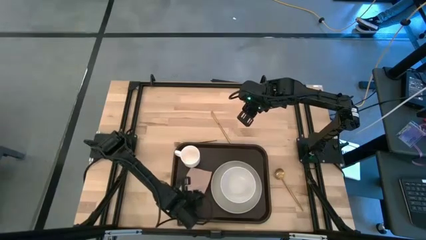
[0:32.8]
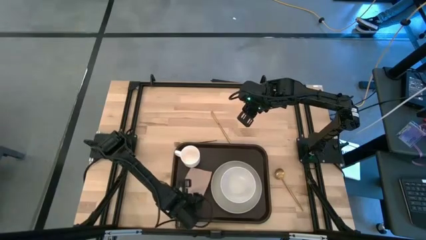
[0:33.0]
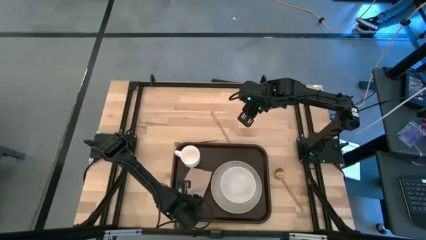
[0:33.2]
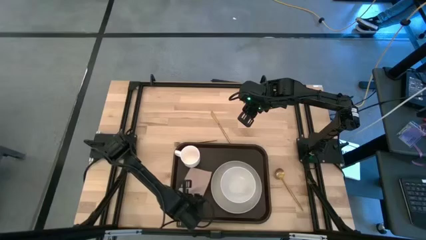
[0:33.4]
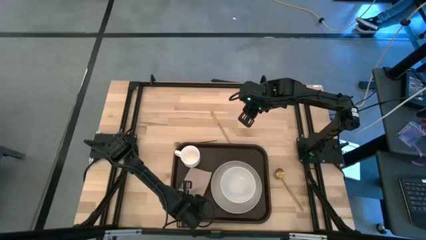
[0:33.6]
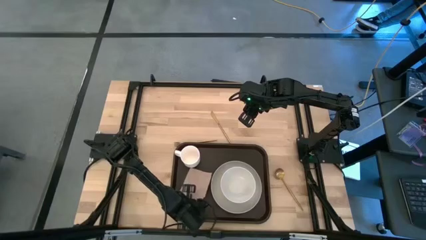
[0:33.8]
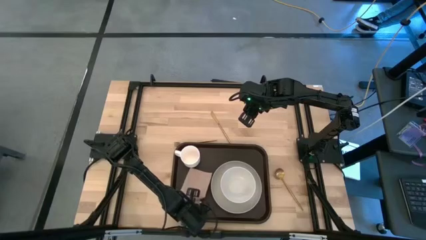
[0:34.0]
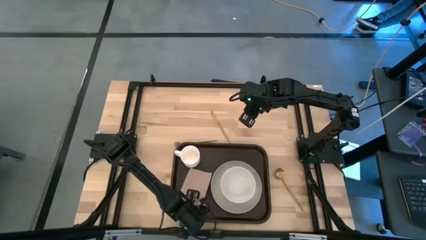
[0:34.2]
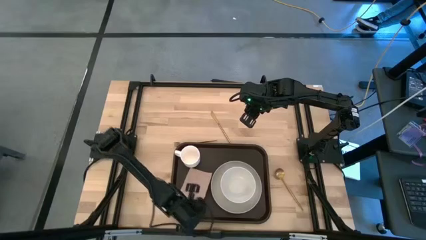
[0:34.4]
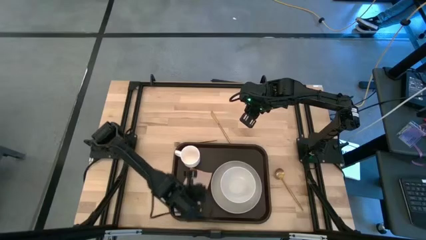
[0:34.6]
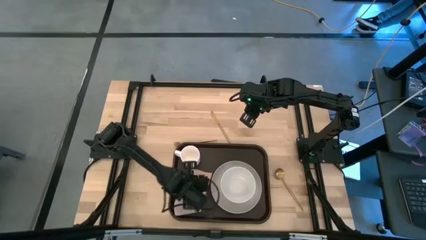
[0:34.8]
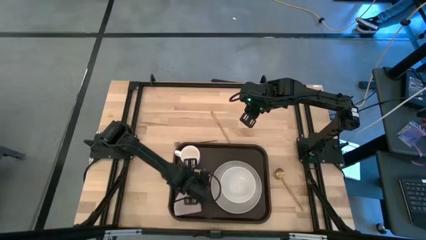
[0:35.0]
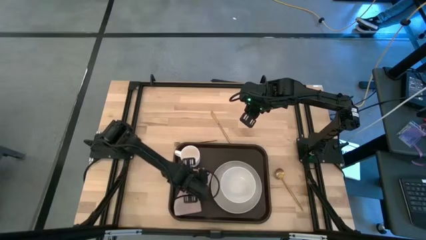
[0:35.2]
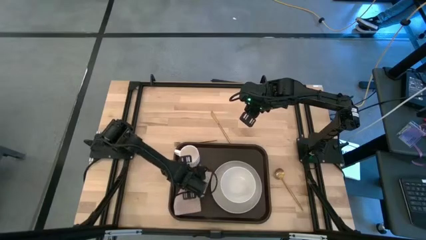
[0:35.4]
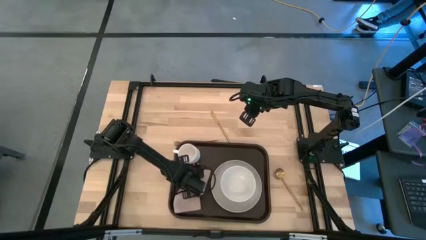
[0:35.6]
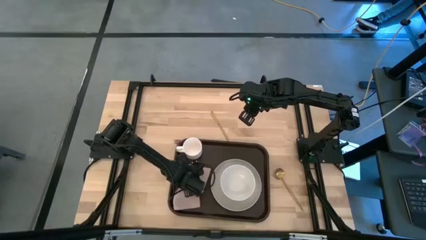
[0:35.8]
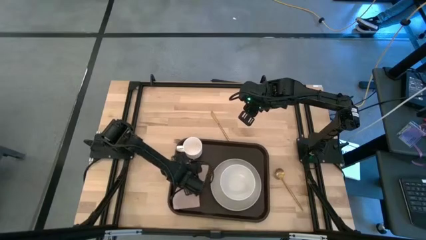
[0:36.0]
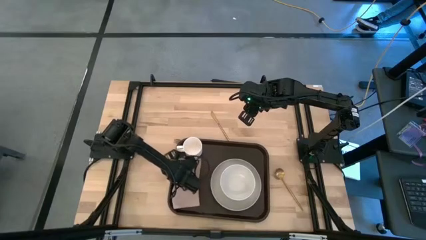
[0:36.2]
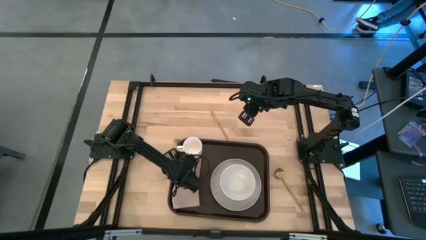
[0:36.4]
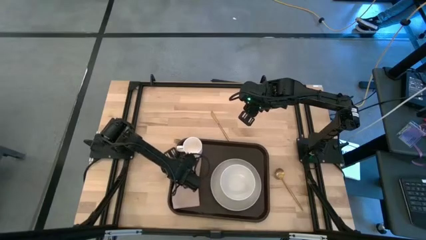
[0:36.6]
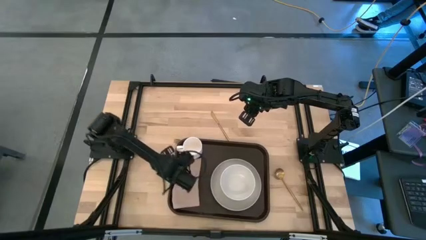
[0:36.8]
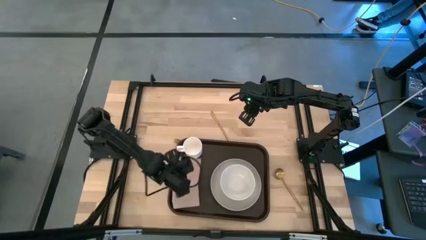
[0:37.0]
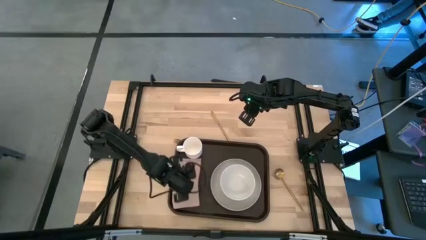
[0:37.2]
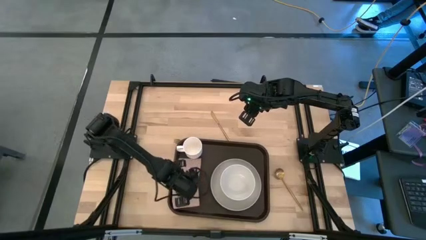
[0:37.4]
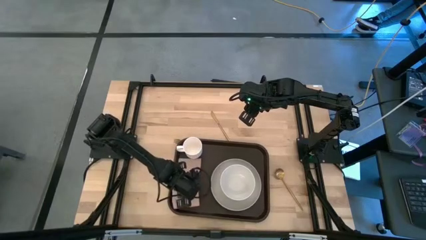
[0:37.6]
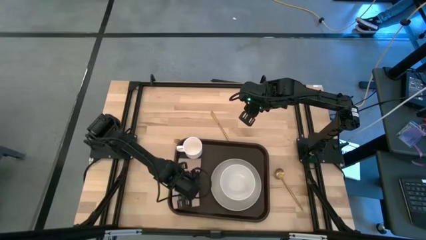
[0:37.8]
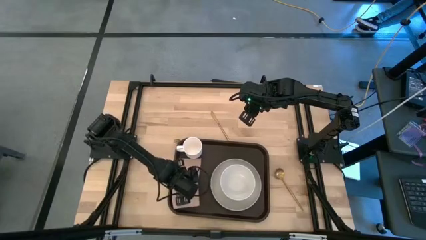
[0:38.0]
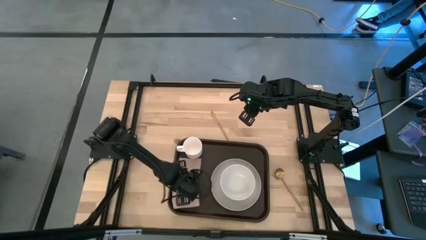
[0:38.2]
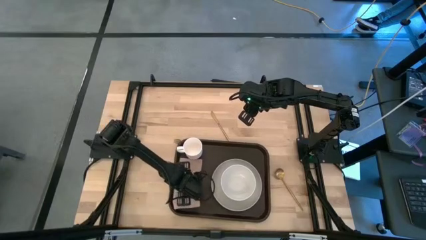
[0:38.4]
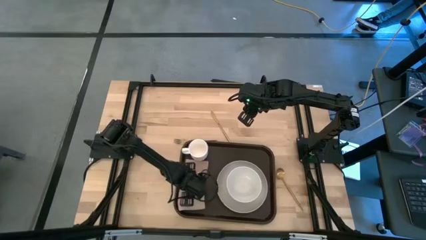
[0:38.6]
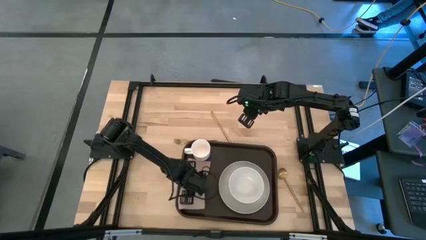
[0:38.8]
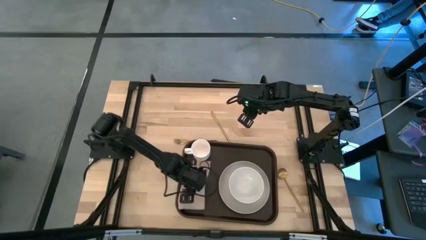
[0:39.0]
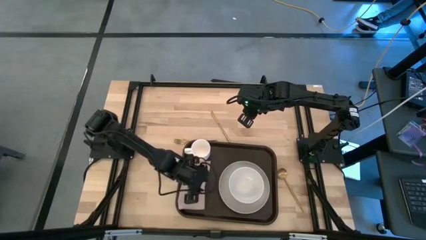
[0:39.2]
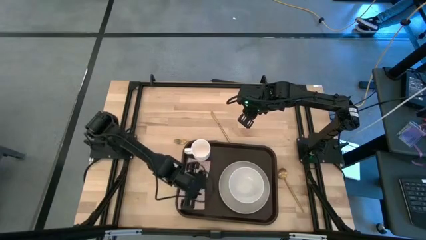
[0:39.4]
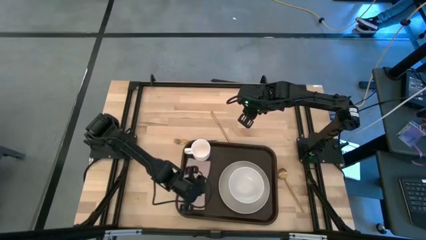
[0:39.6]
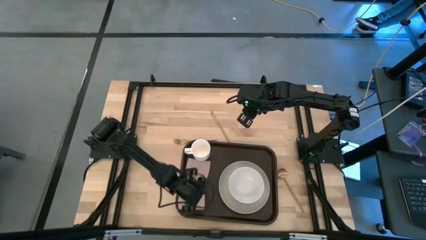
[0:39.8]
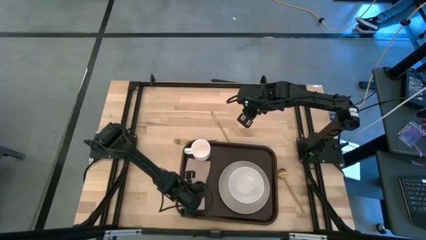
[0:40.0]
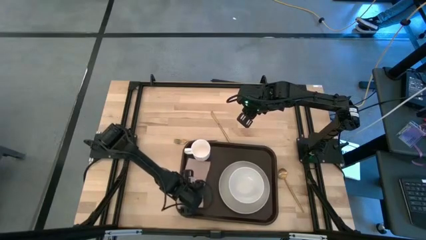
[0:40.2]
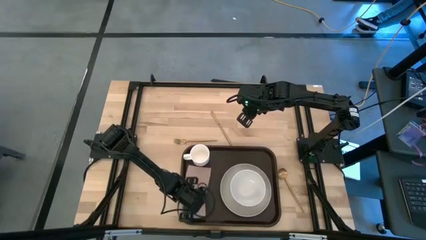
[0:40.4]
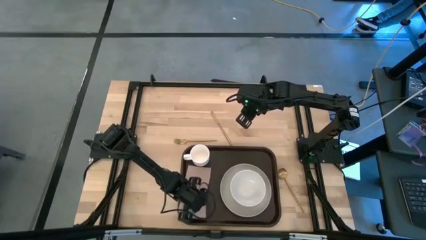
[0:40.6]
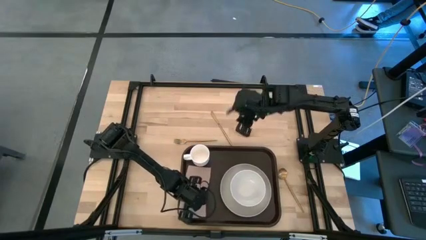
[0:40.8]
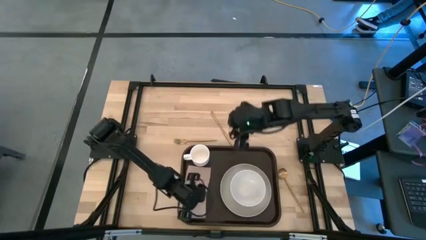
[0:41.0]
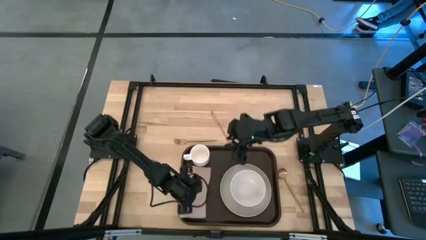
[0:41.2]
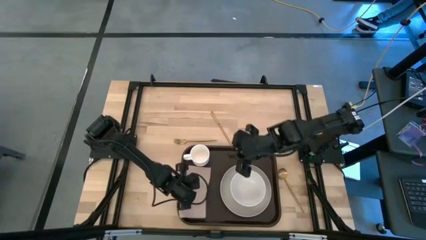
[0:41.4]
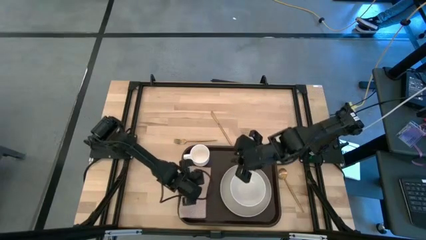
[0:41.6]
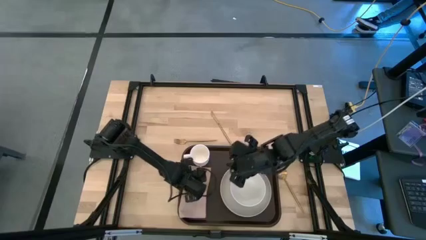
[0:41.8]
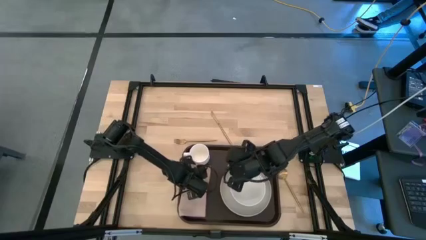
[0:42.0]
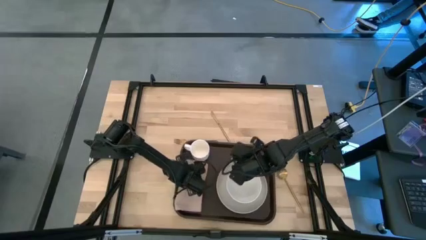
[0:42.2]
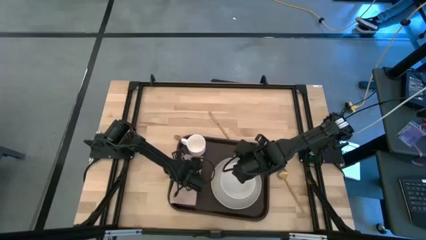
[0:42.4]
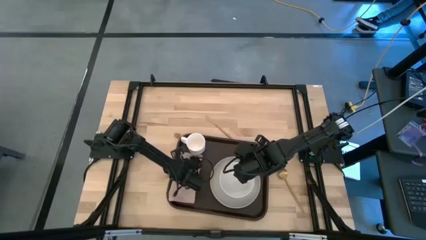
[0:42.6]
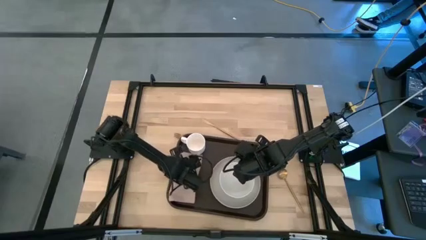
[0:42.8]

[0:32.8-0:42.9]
Task: Set up tray
Put the brown napkin on the black serving tray to the bottom of the white mug

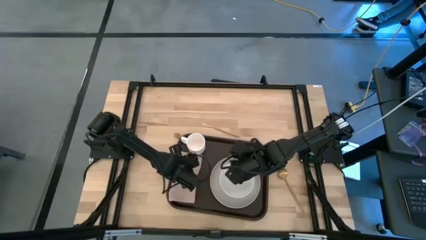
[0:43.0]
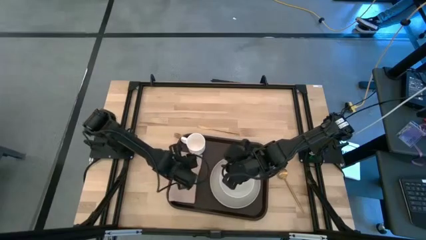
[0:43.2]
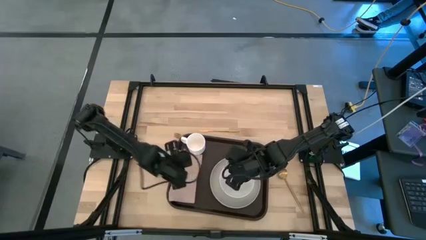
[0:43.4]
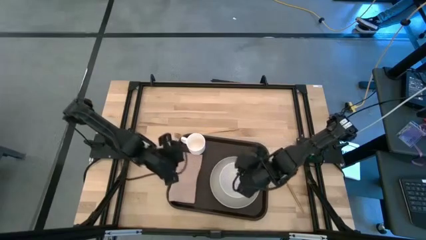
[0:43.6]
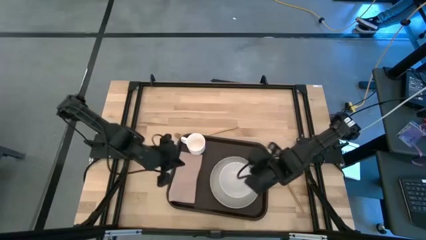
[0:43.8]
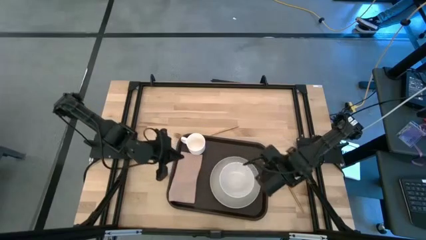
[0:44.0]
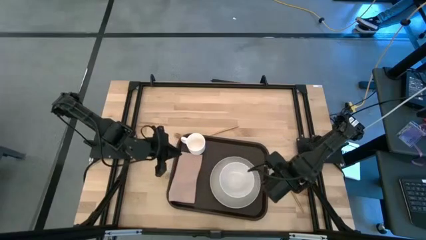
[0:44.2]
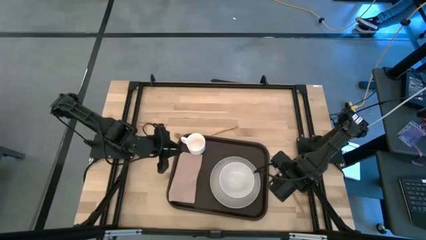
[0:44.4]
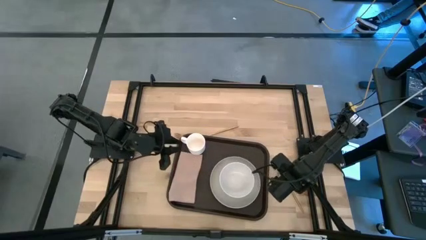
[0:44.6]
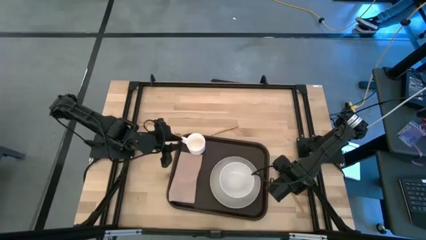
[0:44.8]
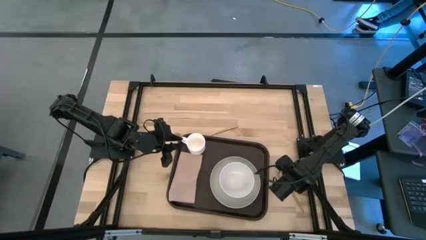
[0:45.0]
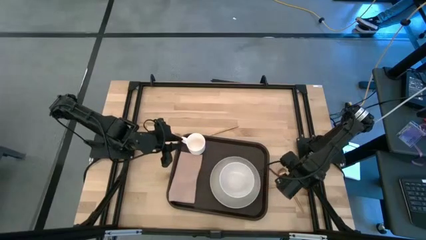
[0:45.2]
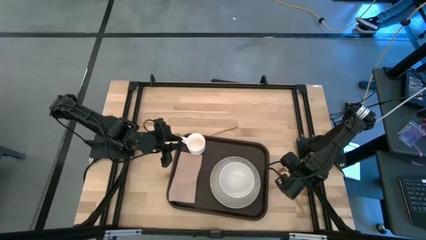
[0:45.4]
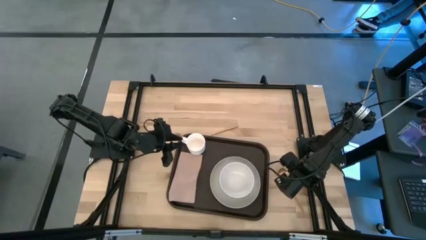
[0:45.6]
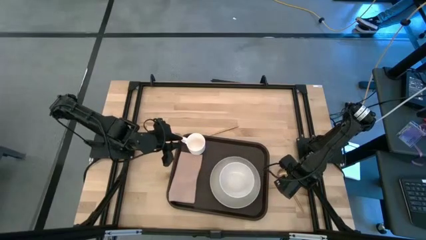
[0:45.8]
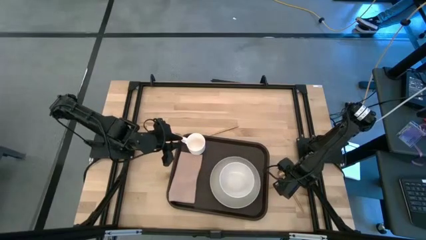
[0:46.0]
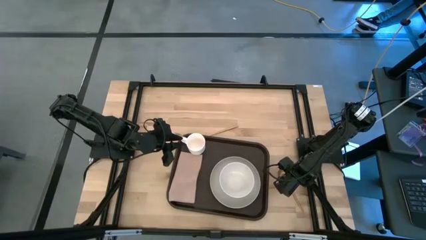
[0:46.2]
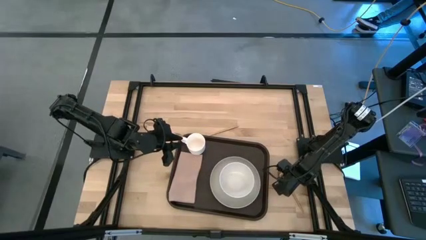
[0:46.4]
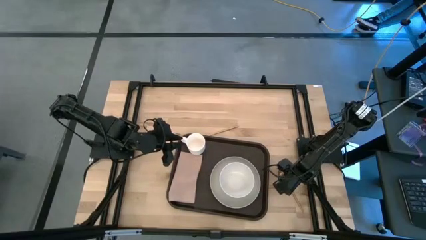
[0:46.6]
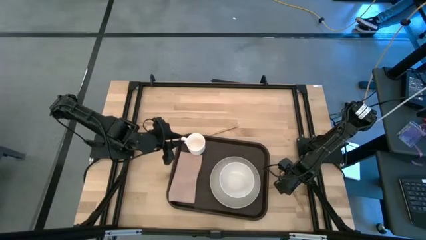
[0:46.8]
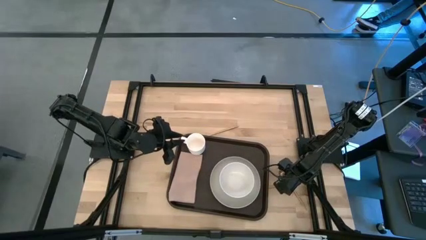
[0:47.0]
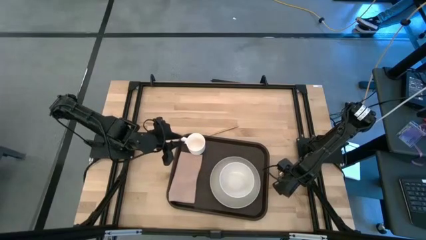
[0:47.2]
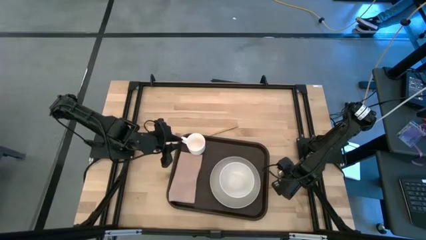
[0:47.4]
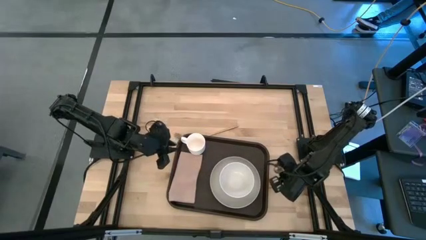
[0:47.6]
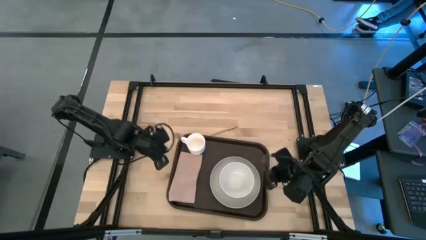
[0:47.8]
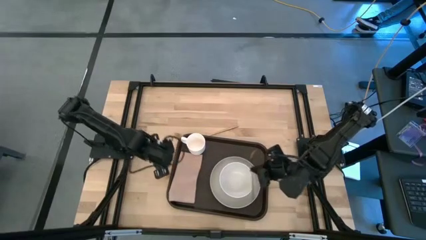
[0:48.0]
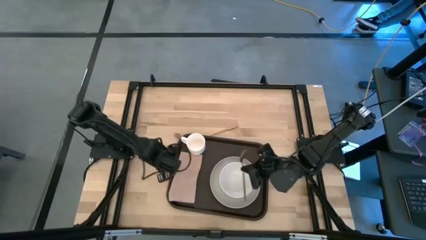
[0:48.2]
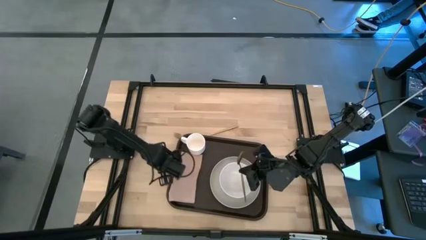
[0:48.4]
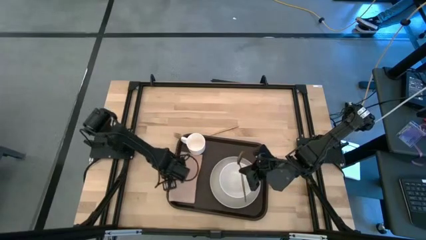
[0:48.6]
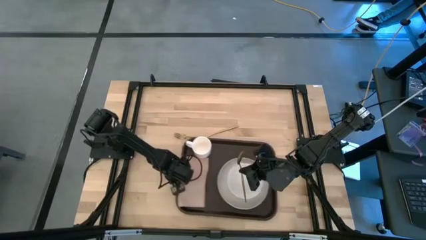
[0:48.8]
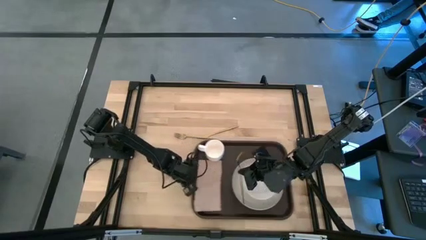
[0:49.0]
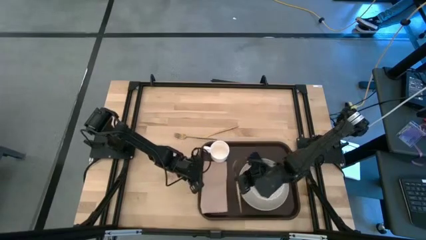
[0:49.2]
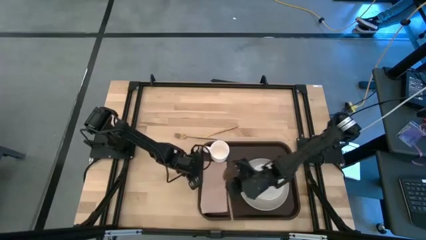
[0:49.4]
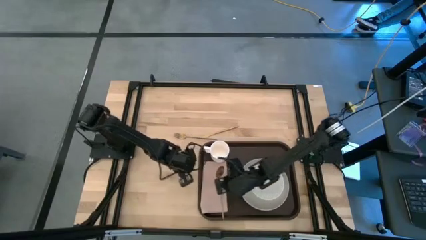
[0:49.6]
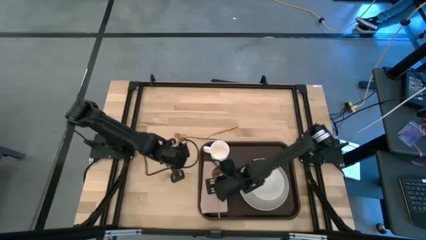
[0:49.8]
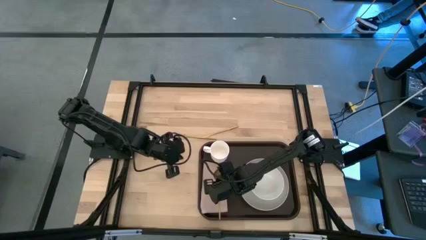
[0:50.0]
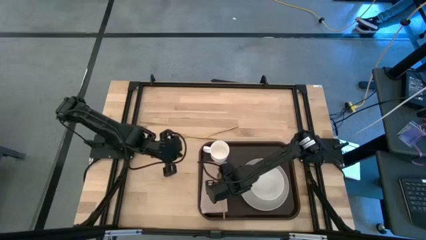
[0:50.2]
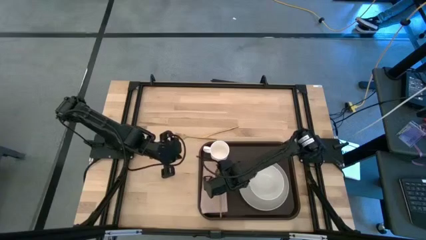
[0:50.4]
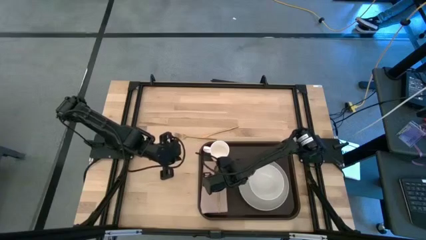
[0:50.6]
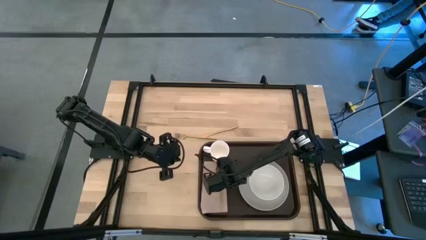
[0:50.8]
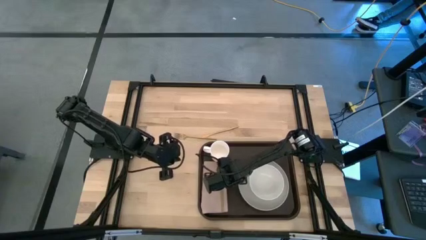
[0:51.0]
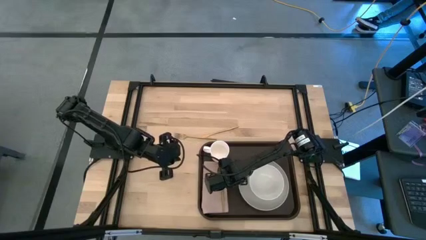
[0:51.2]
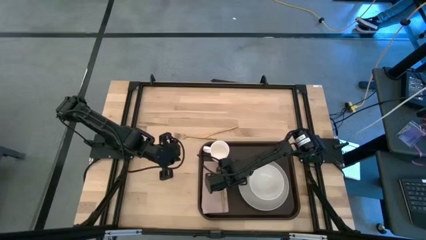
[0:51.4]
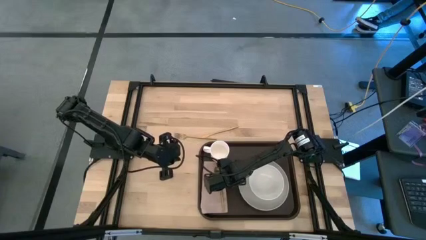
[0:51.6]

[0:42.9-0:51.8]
Put the gold spoon on top of the brown napkin
